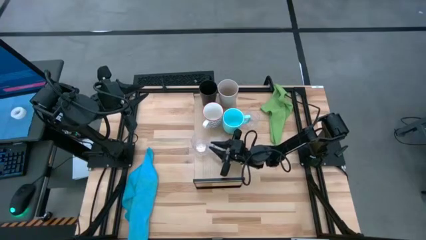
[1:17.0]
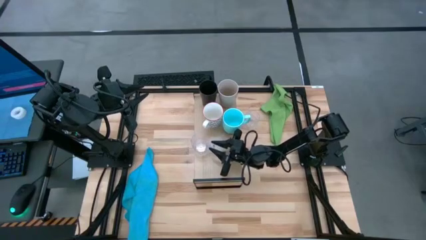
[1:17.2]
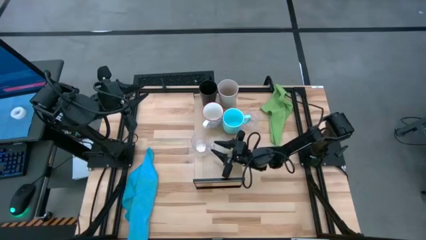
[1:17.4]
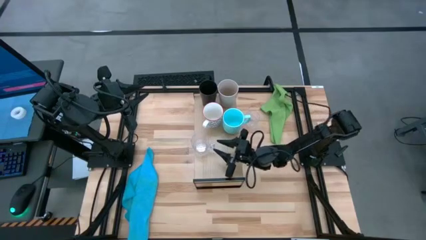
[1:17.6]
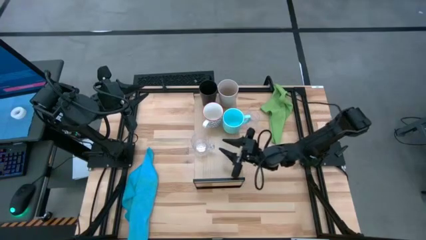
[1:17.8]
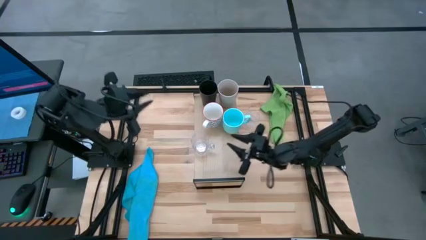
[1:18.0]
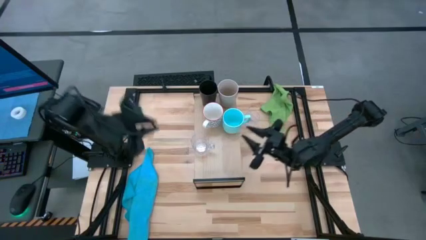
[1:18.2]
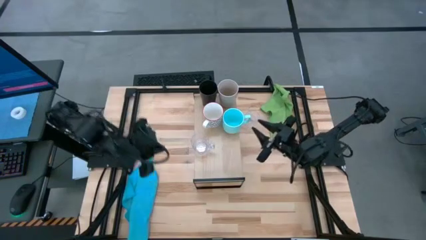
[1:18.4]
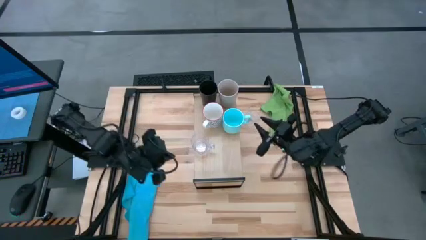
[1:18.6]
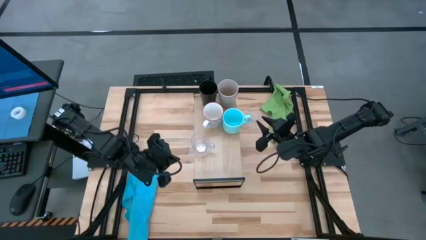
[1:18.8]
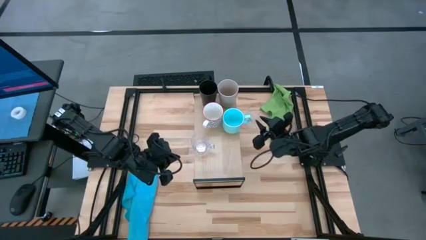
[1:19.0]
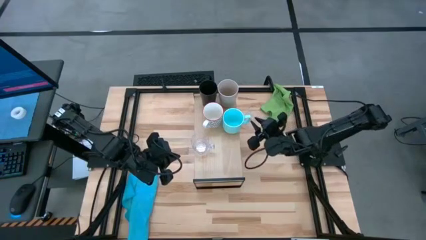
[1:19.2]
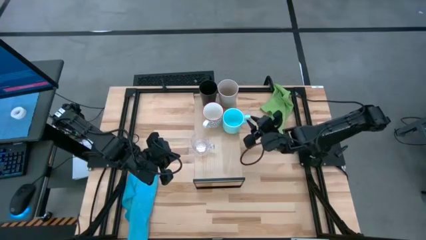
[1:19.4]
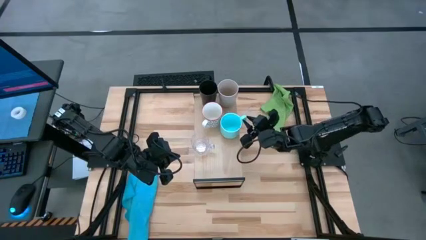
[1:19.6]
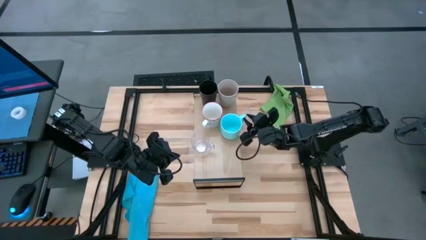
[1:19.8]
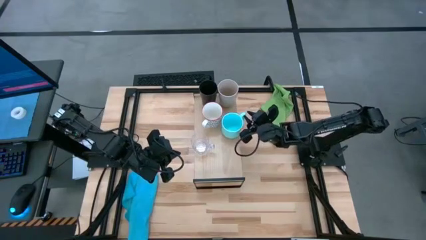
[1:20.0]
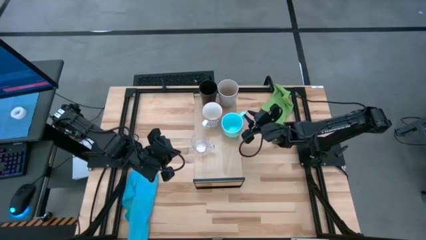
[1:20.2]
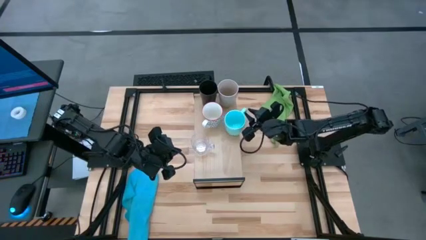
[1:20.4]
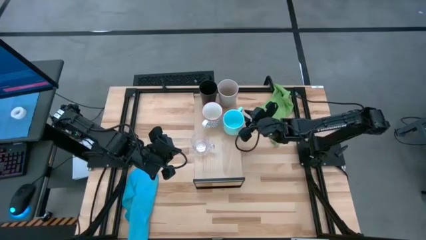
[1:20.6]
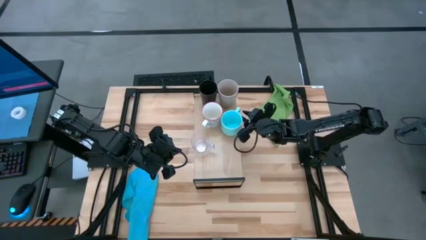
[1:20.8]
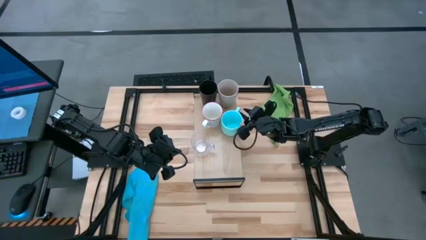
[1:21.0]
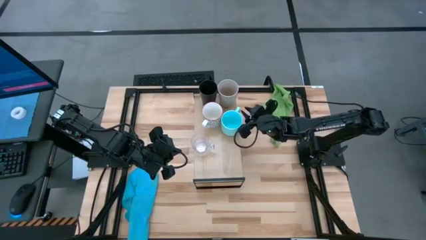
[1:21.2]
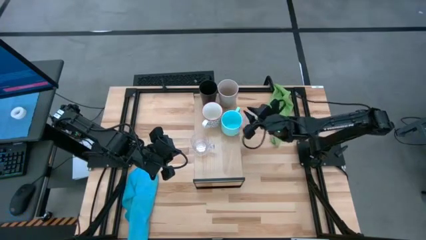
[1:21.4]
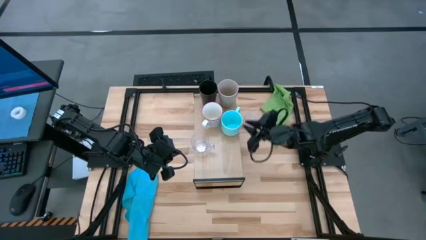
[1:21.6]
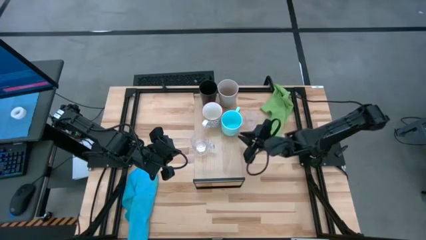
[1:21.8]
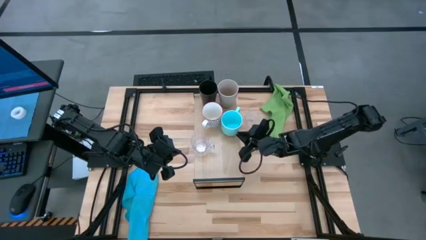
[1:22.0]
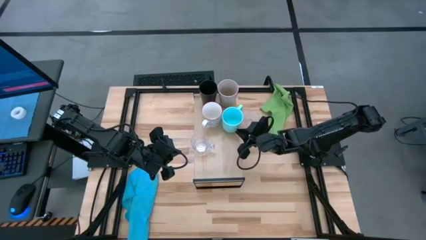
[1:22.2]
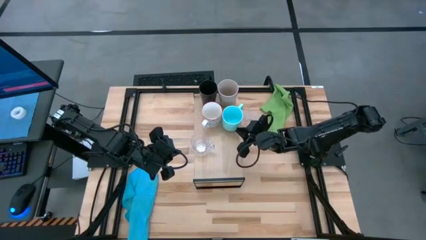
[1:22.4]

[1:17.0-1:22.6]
Task: Stack small to large cups/mugs on shelf
Adjust the blue cup on the shelf

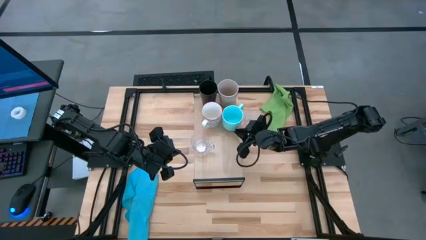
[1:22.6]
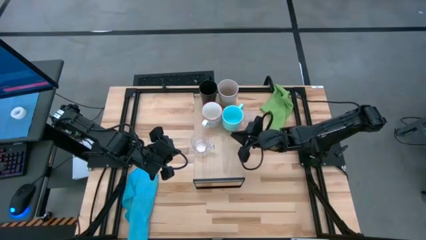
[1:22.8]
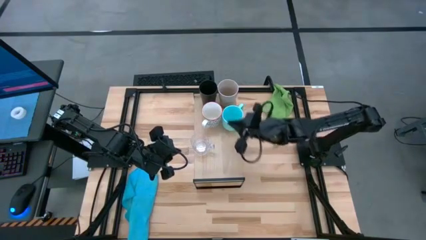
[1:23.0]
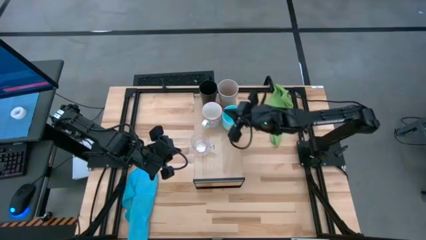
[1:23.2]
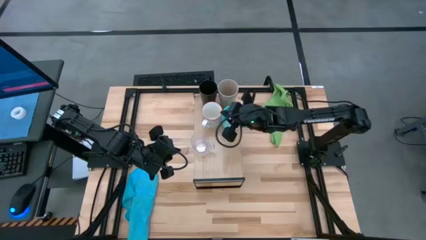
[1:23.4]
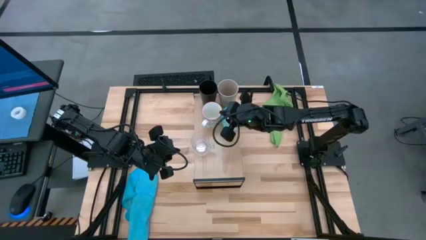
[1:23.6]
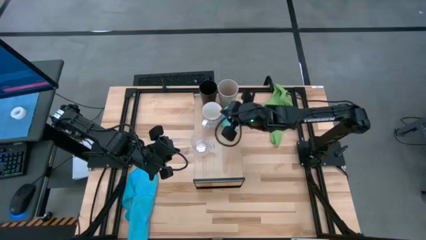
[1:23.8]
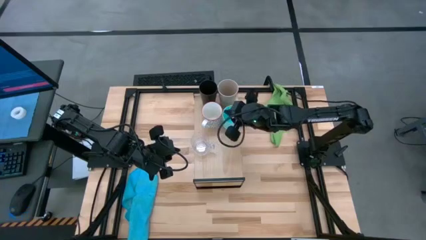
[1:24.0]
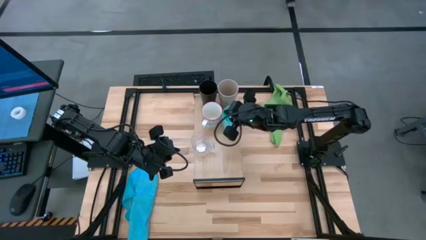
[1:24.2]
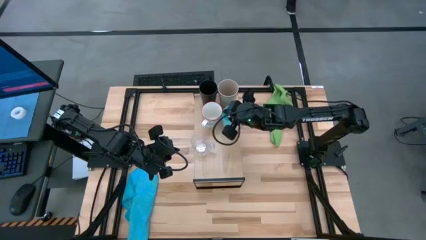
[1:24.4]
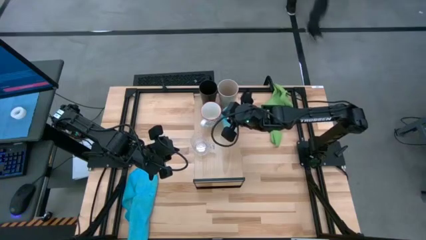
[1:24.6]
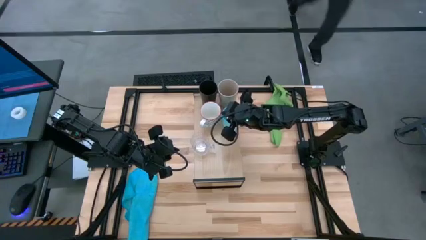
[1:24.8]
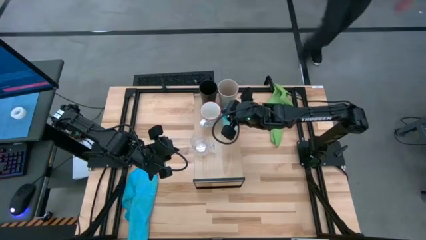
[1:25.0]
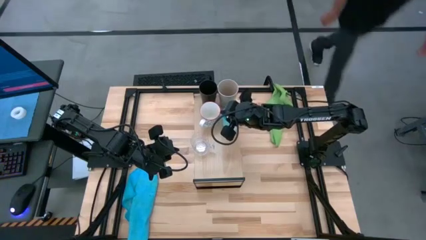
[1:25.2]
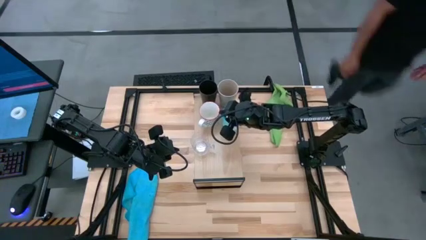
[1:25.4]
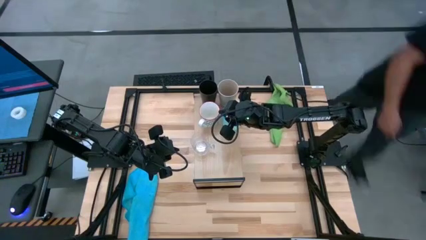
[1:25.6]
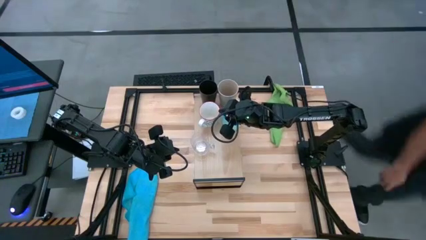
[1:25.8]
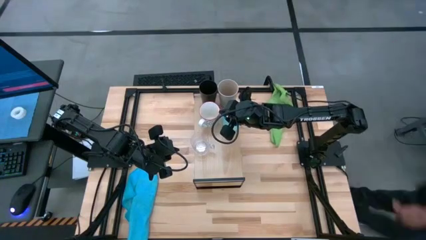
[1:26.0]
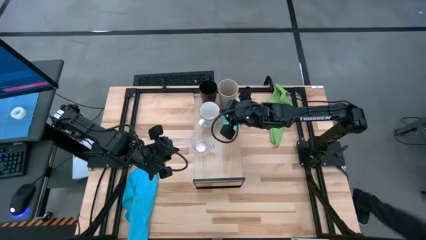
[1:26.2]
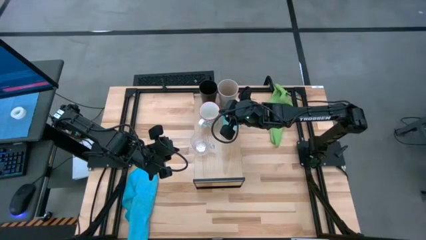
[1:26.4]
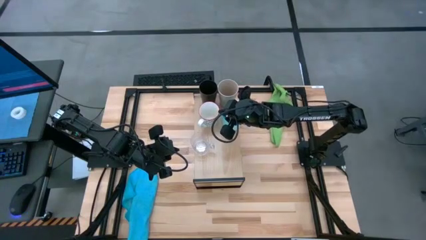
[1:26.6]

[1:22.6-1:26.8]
Adjust the gray cup on the shelf

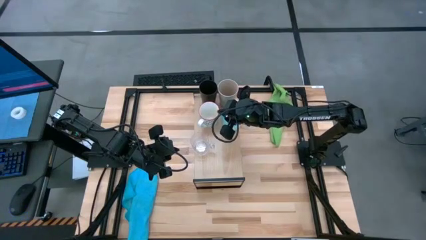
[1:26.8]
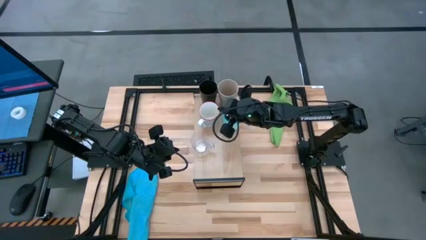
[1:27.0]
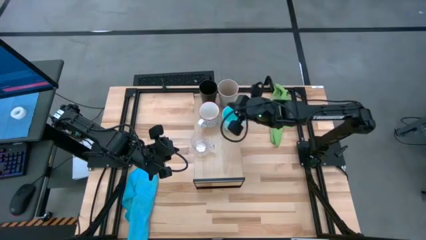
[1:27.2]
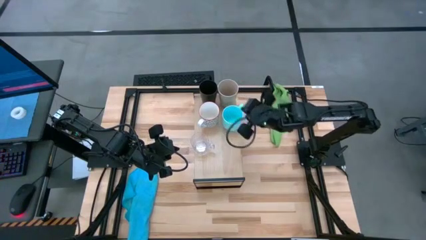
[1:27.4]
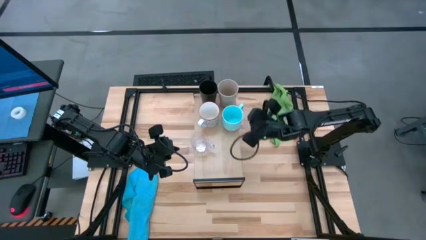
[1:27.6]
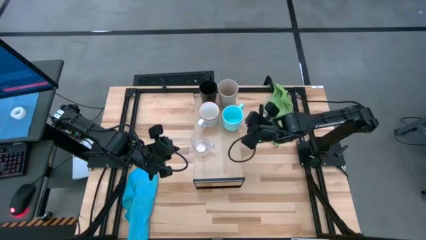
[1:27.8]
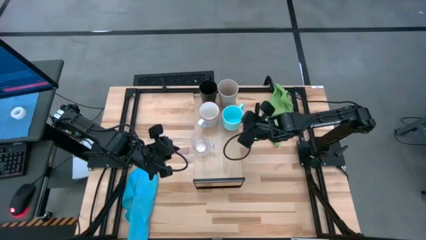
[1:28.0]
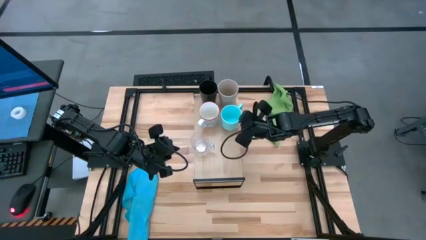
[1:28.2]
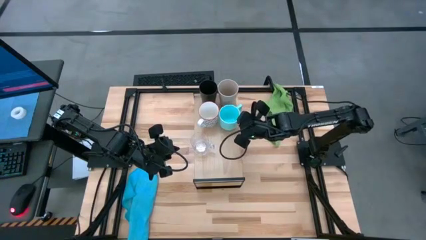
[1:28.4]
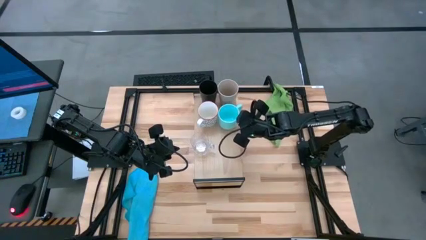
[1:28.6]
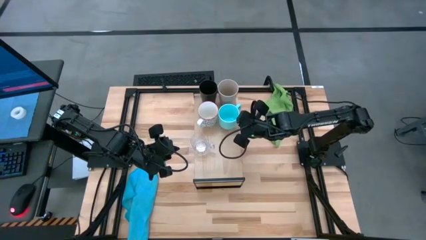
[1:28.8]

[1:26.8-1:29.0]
Adjust the blue cup on the shelf

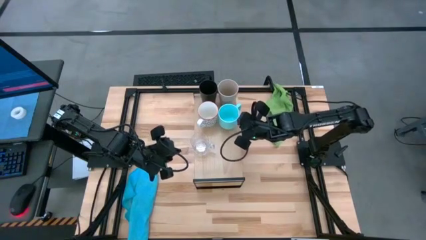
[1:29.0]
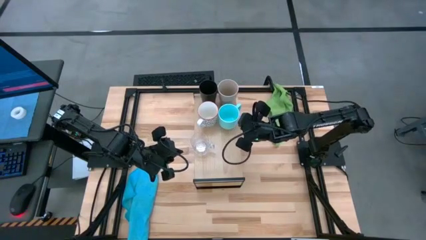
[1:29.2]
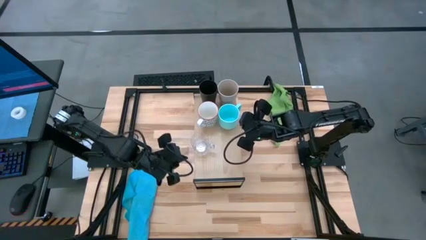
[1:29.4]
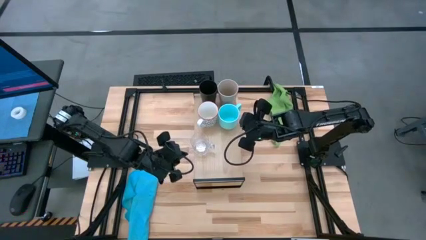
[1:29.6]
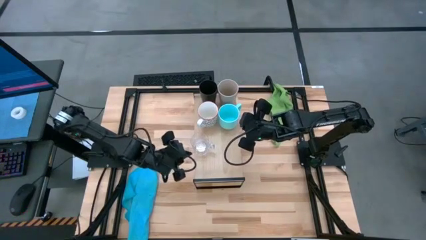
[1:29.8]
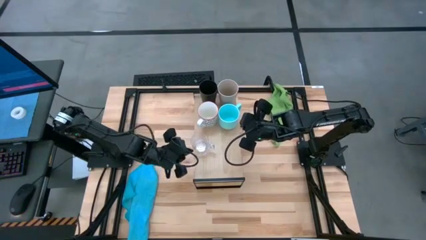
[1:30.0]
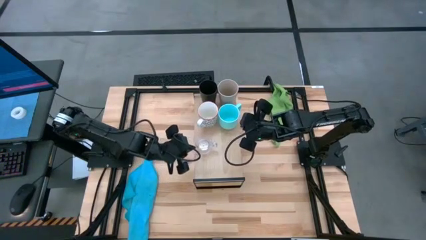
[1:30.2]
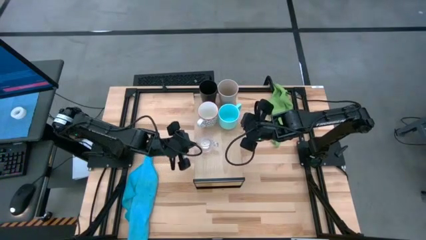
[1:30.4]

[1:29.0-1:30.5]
Adjust the transparent cup on the shelf

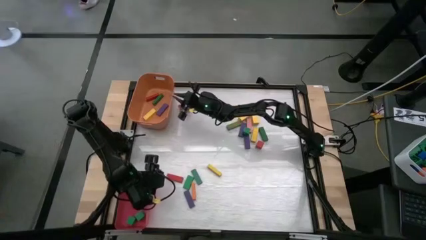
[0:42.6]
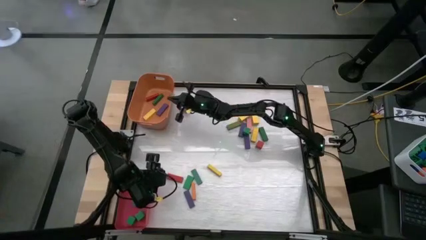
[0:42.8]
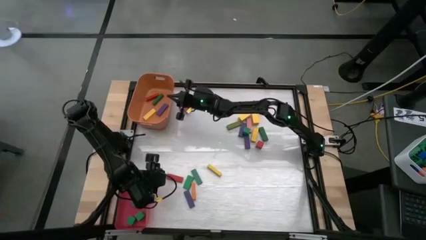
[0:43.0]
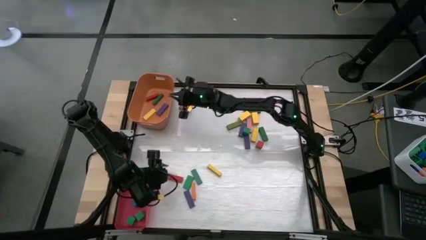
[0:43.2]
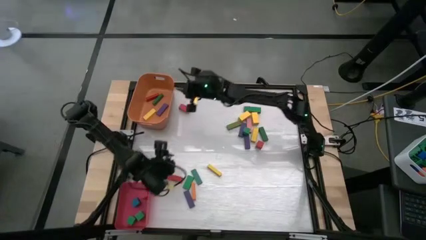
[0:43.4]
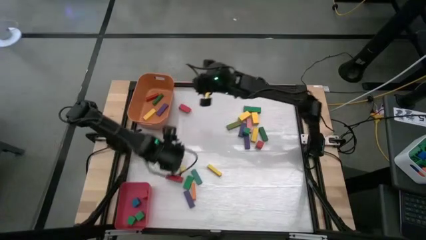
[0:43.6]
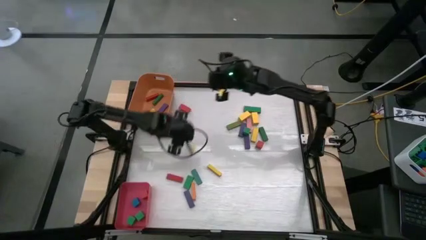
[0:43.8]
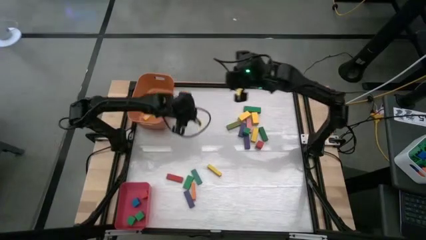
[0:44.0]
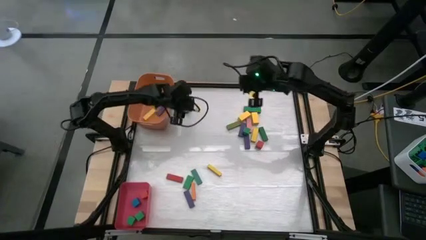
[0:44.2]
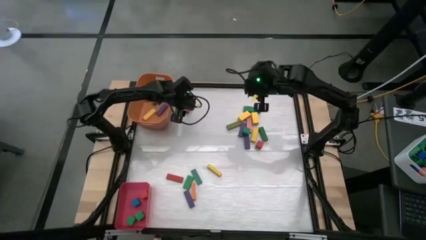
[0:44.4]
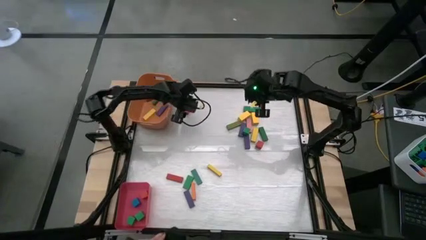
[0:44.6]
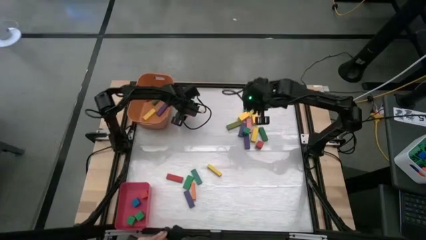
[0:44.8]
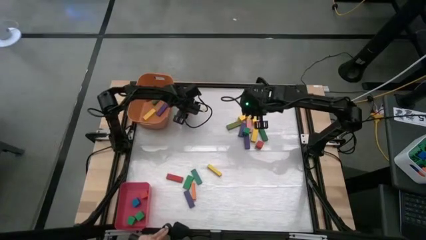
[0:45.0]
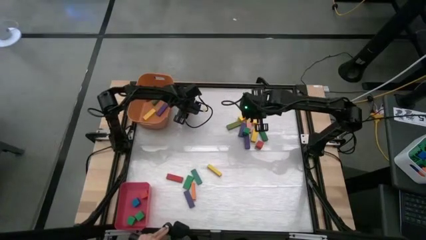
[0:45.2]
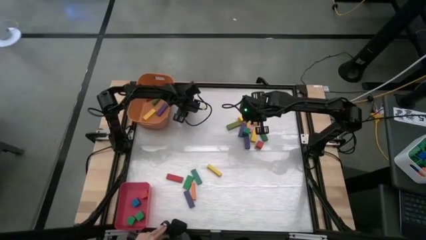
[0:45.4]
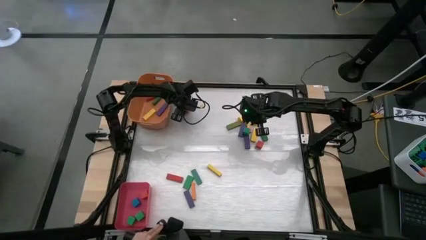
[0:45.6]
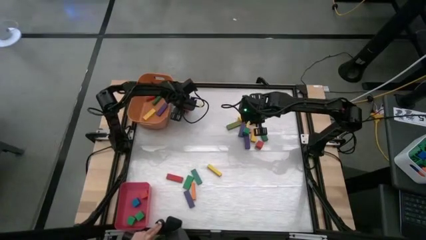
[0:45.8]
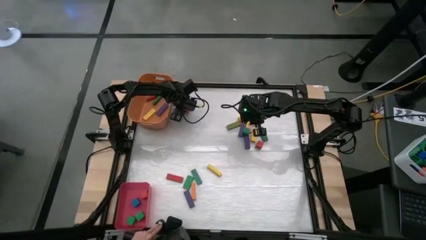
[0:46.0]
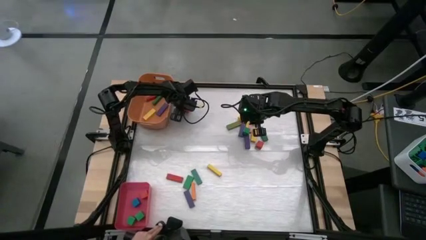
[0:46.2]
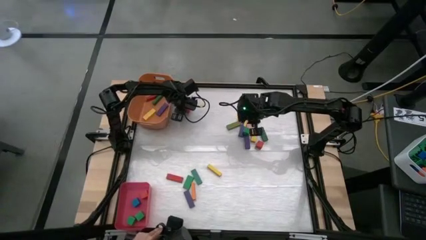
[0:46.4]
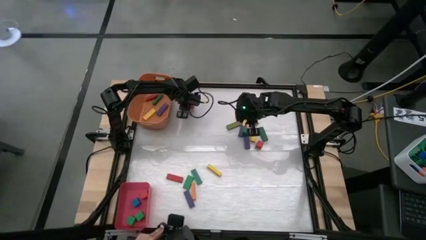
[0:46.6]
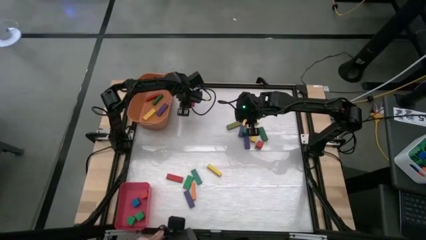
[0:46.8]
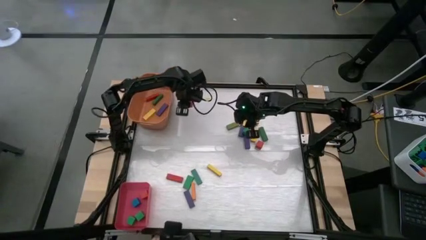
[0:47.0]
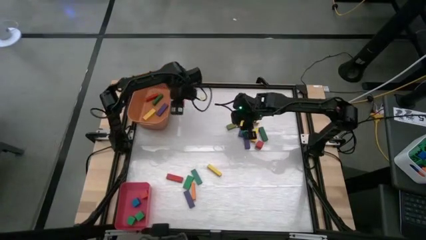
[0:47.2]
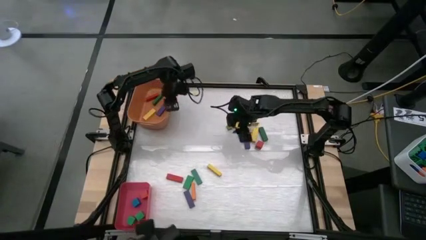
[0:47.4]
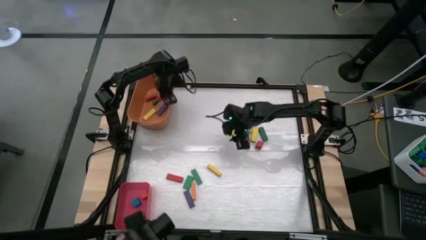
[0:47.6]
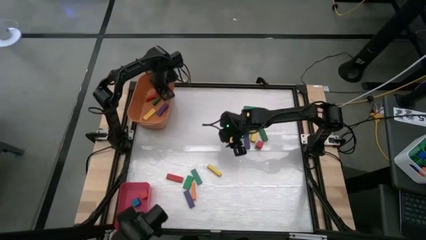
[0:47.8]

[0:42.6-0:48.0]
Task: Sort blocks by size
Put the big red block into the orange bin
